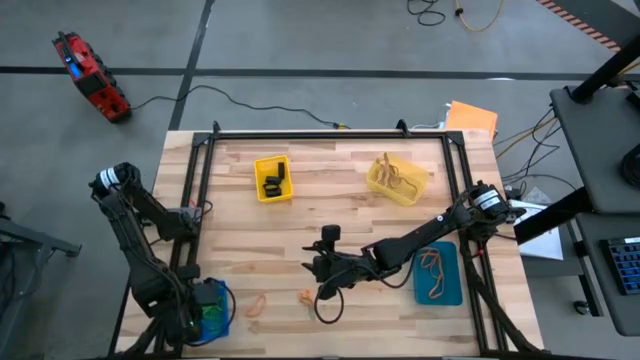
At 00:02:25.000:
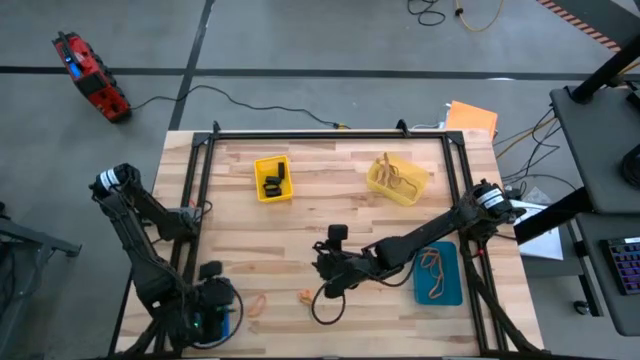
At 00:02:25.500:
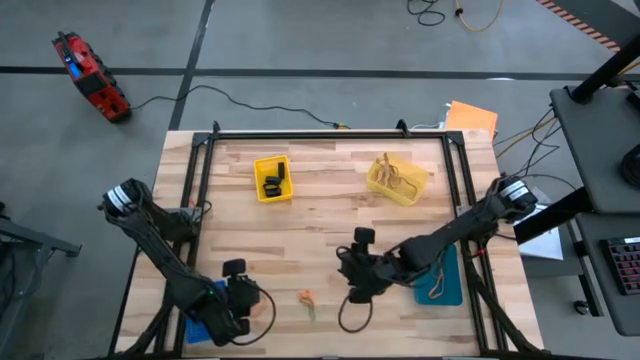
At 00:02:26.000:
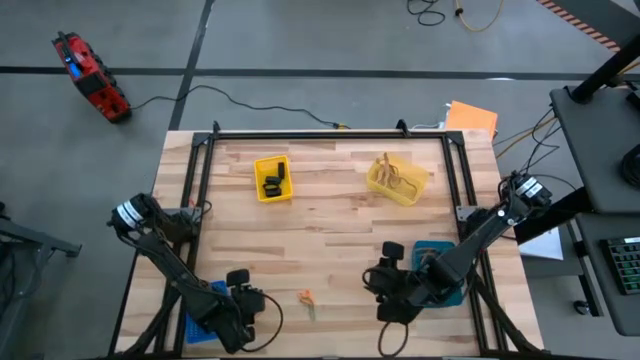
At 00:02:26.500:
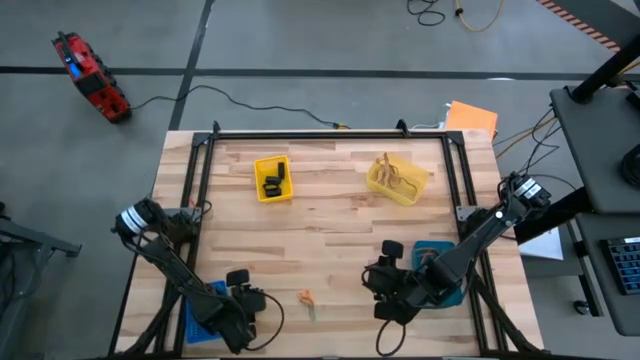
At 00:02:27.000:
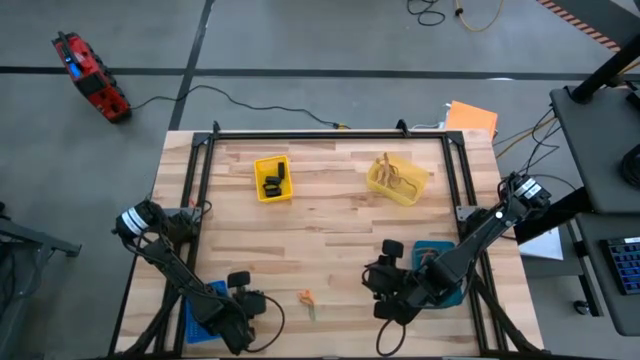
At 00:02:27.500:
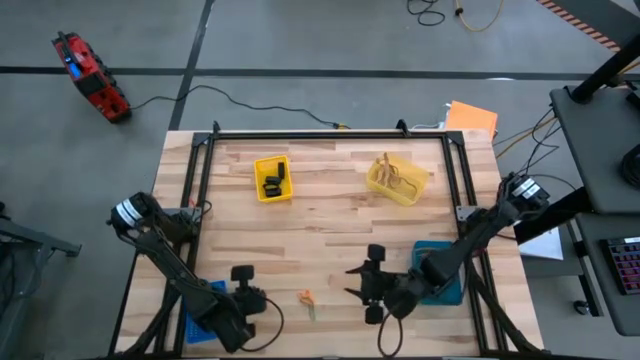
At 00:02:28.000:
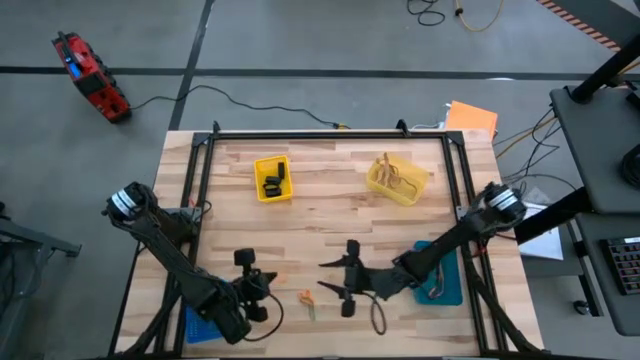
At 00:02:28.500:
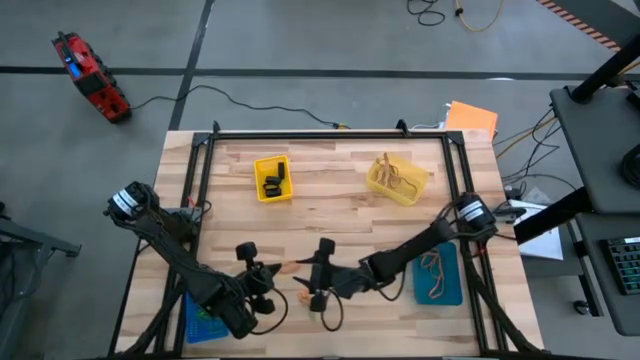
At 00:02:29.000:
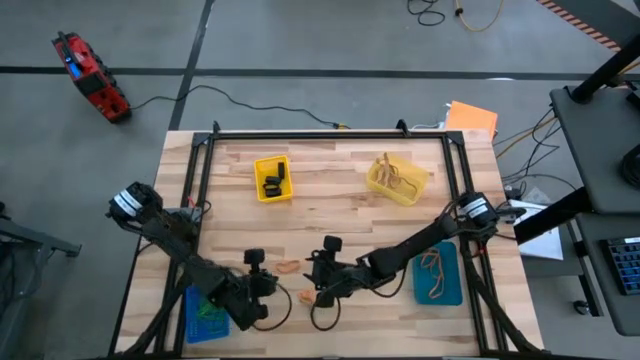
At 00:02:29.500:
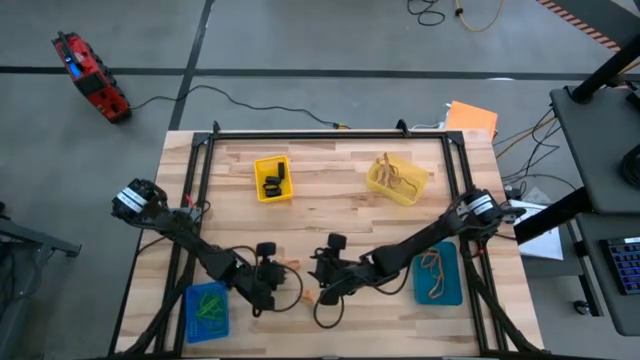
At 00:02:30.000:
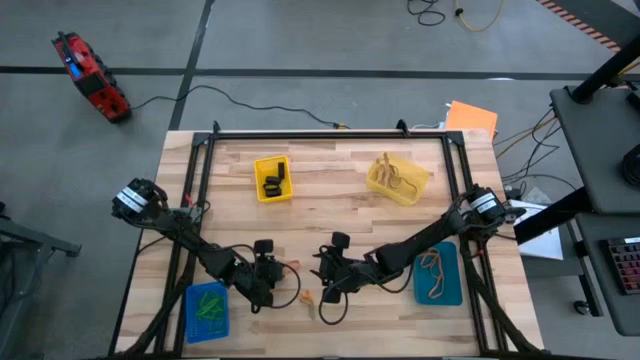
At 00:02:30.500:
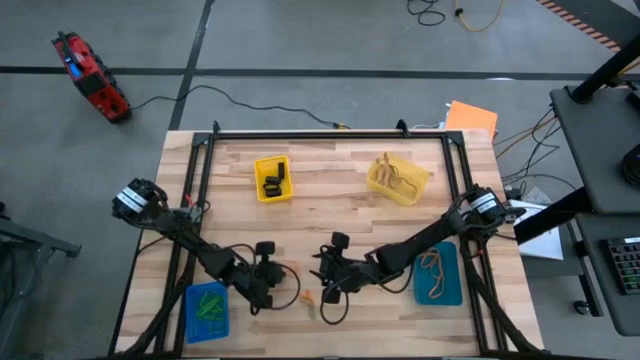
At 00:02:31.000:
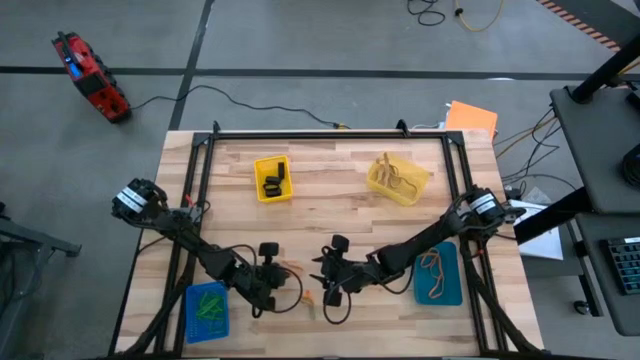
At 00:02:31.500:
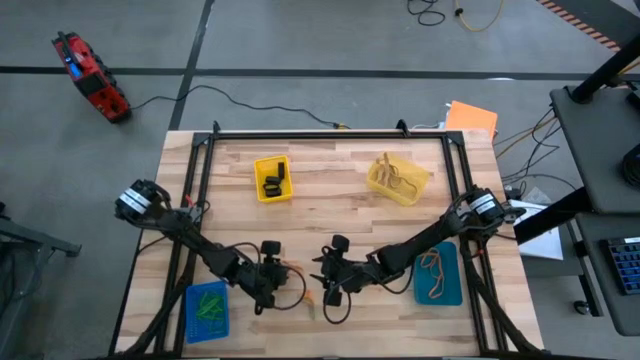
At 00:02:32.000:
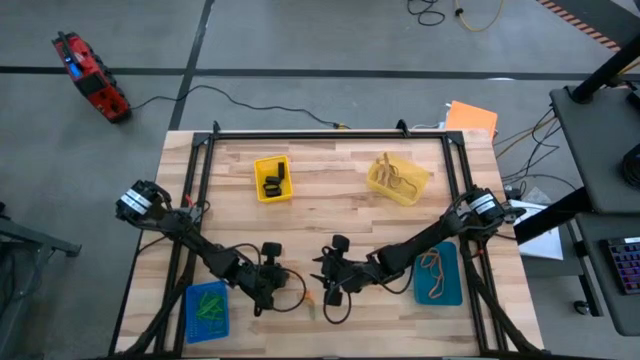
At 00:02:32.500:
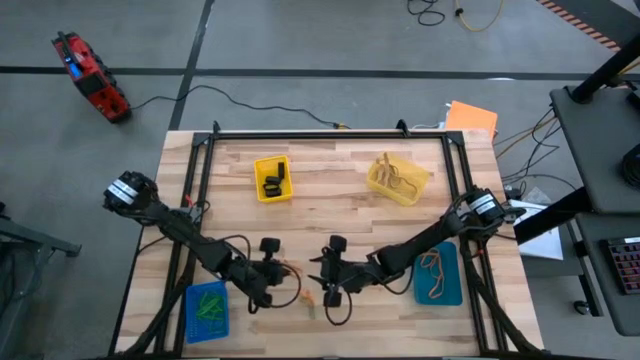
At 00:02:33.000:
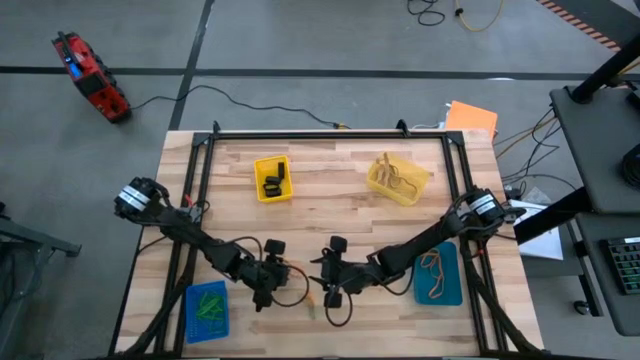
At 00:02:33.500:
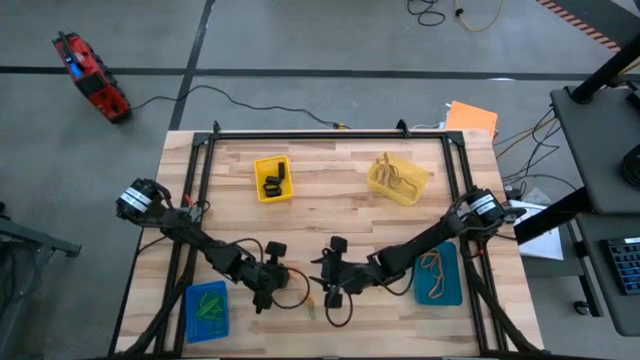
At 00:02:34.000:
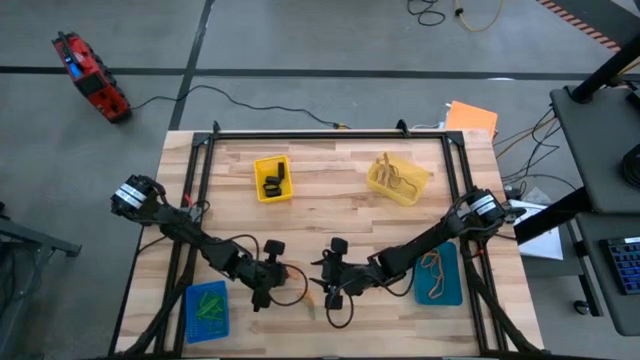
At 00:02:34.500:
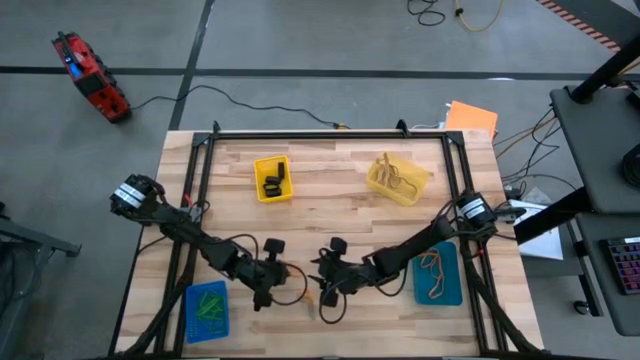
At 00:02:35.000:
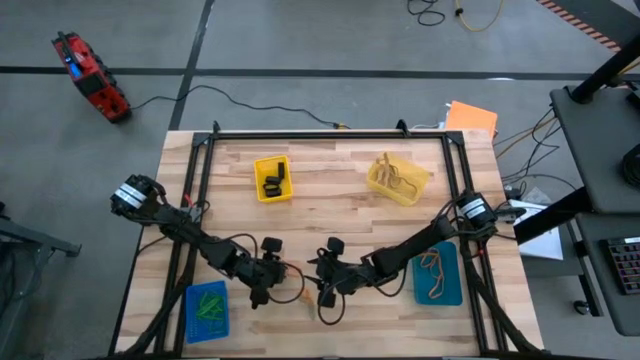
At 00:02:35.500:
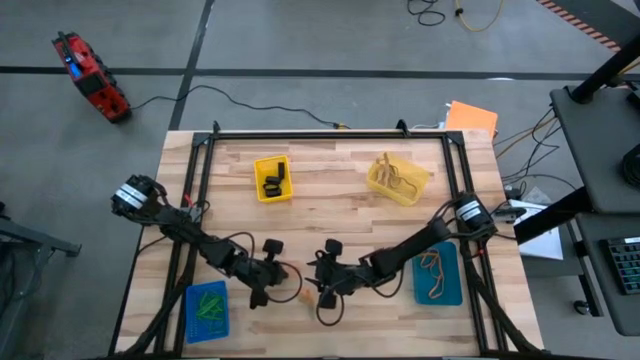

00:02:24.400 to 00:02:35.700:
Task: Sort rubber bands into baskets
Put the orange rubber band into the right blue bin

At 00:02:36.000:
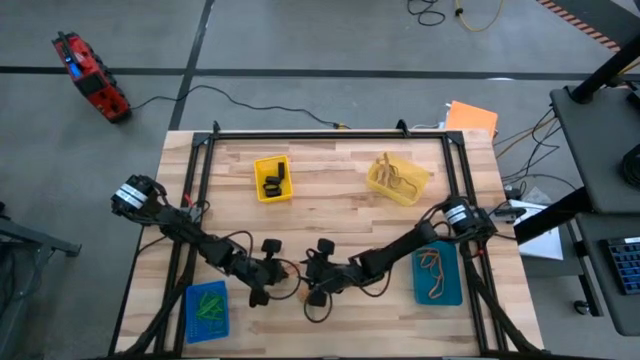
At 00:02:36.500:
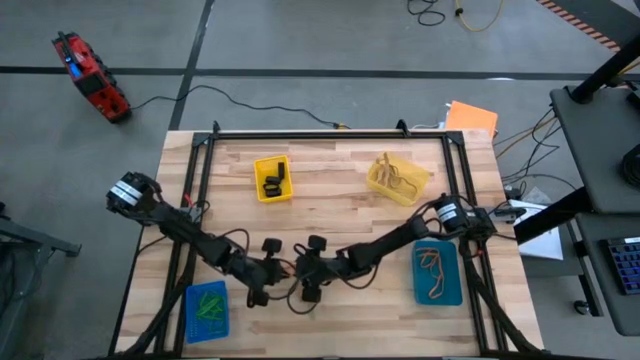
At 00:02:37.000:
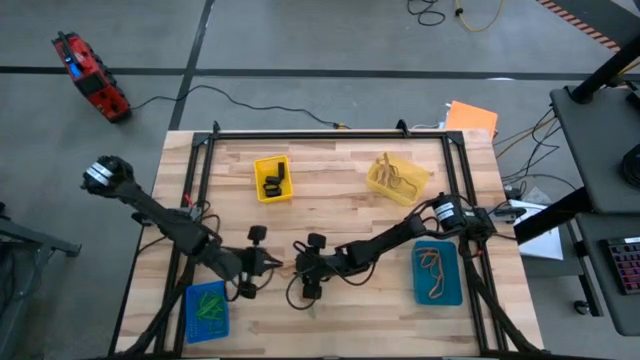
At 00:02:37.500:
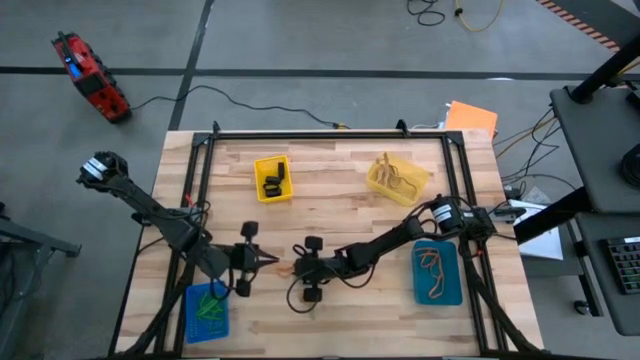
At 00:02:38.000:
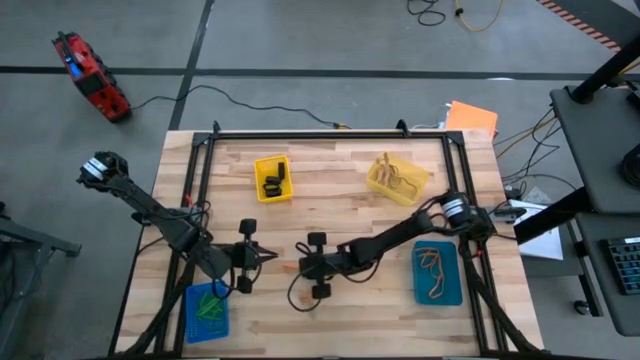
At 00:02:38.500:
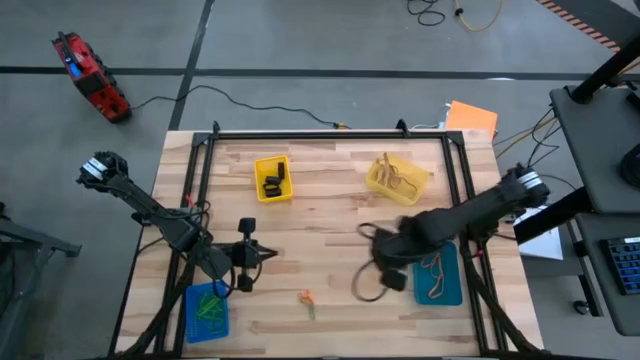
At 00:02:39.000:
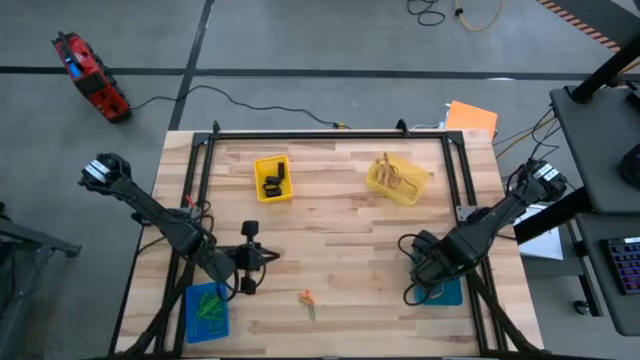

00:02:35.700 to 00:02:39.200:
Put the orange rubber band into the right blue bin

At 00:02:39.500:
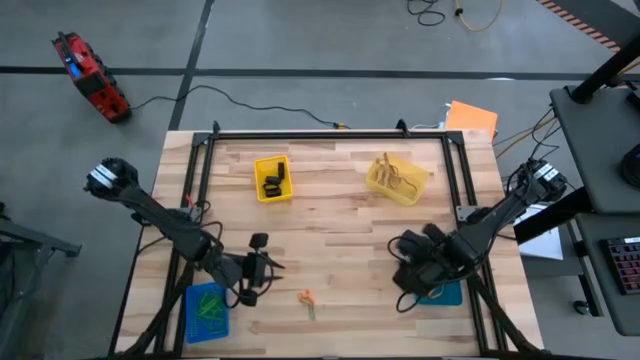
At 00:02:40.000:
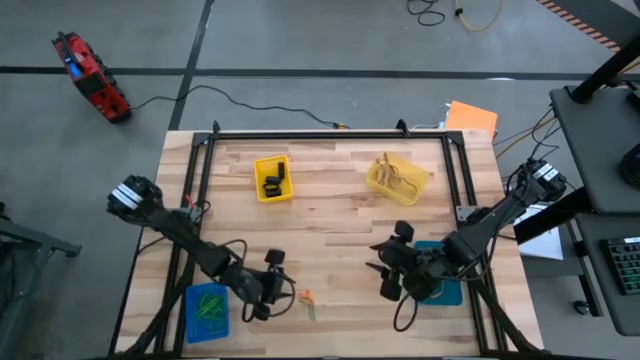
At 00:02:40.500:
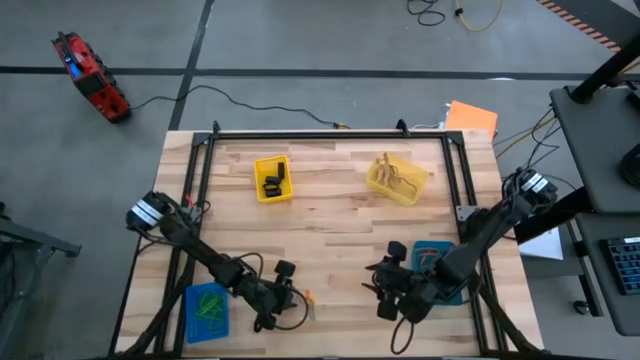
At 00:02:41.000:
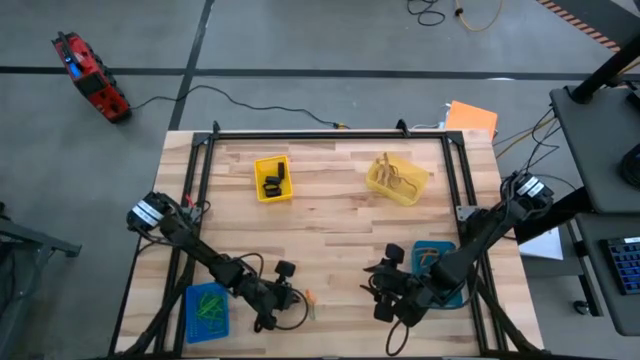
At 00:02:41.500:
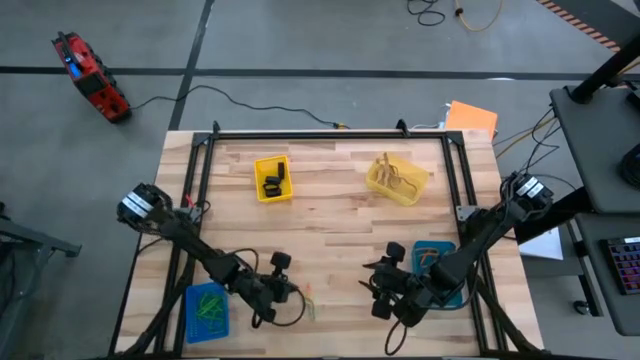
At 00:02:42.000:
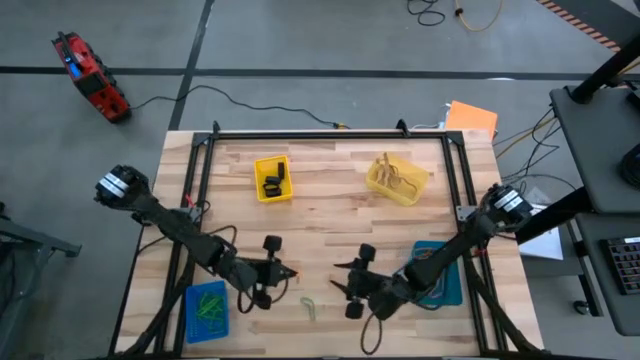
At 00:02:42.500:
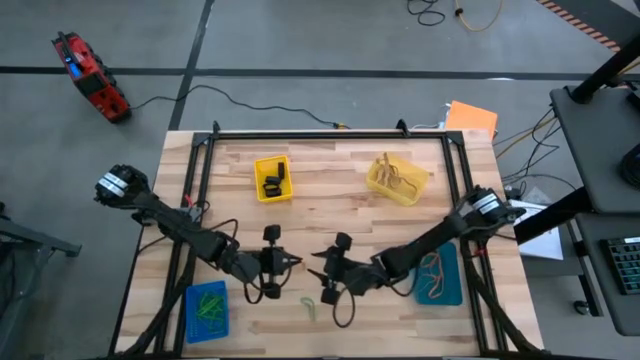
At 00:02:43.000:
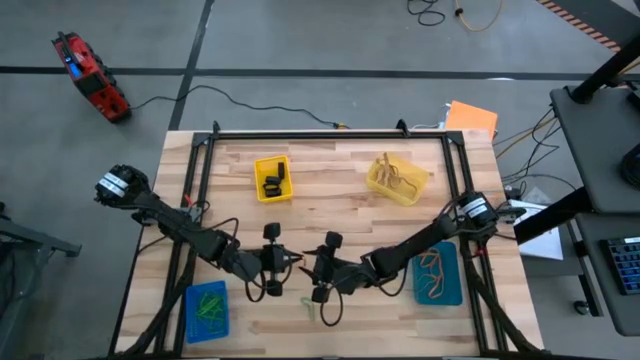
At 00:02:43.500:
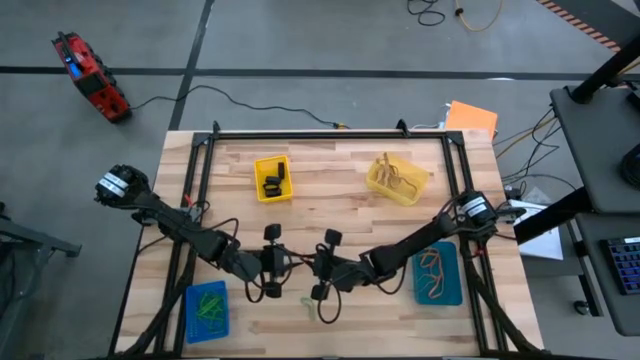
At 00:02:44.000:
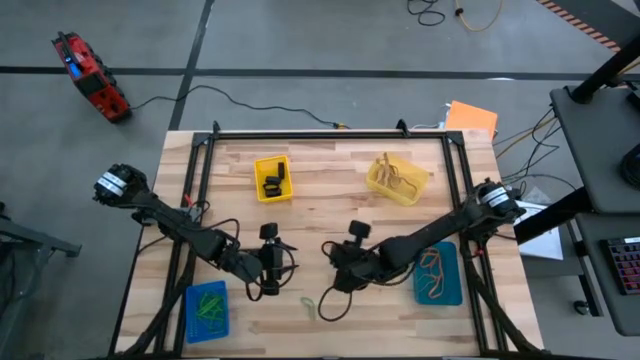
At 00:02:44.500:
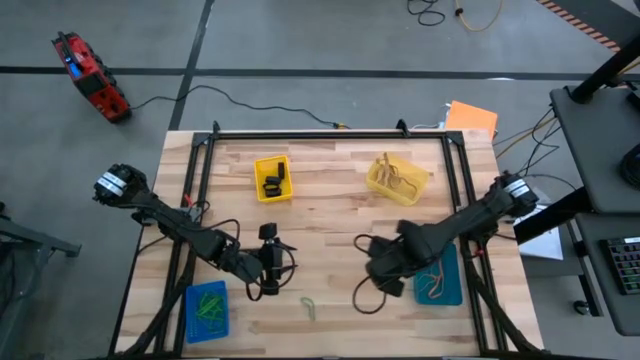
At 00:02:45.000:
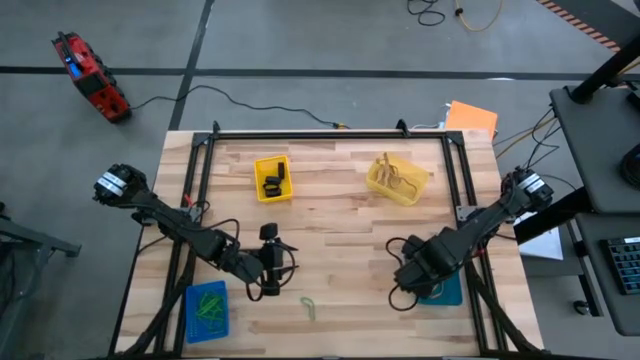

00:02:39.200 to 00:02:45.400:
Put the orange rubber band into the right blue bin
